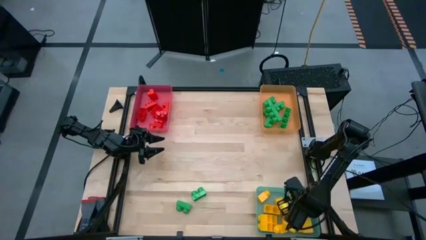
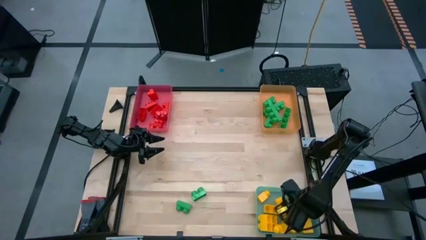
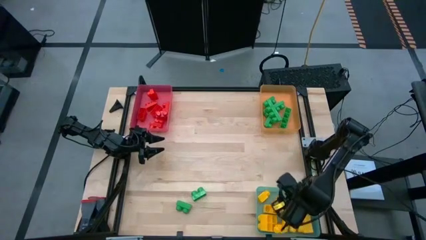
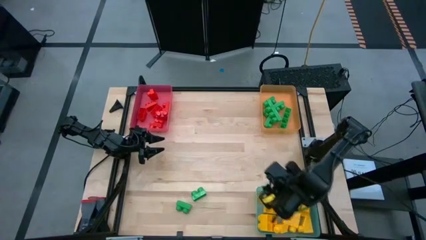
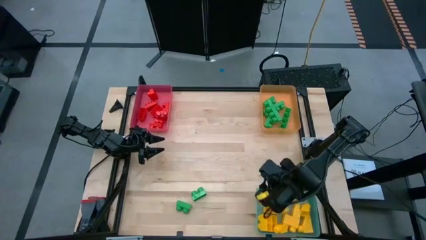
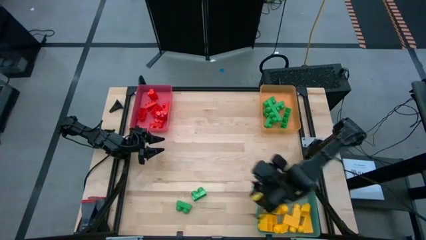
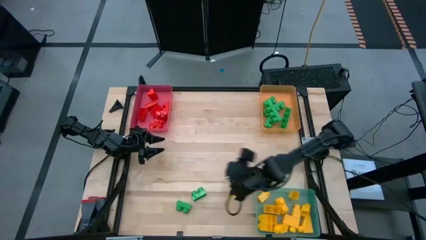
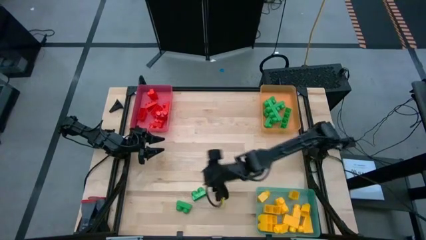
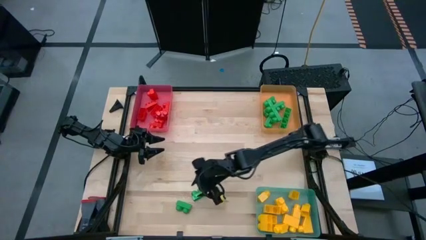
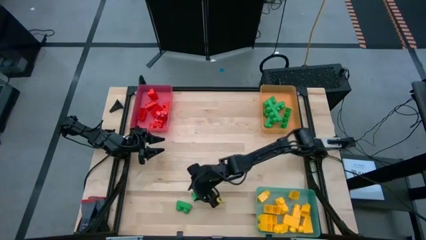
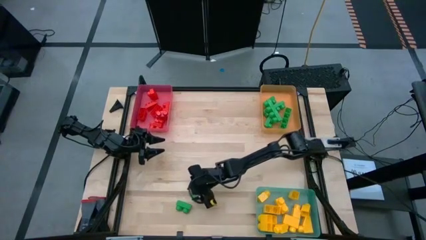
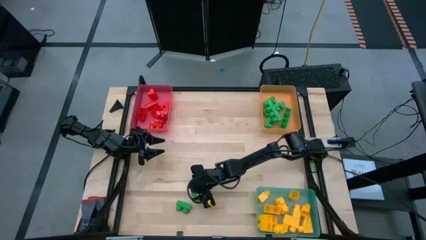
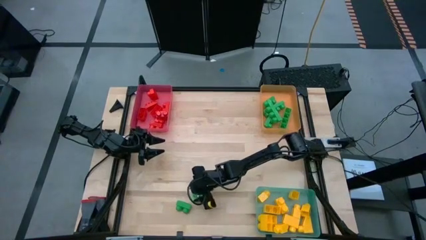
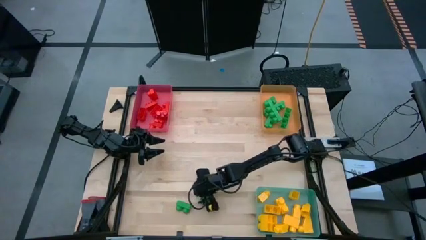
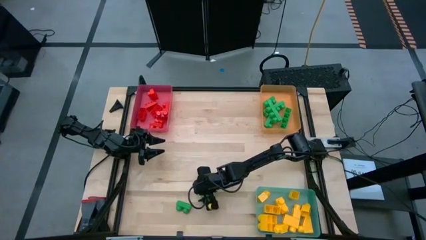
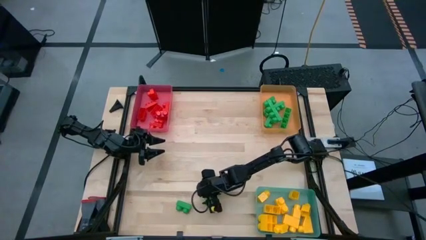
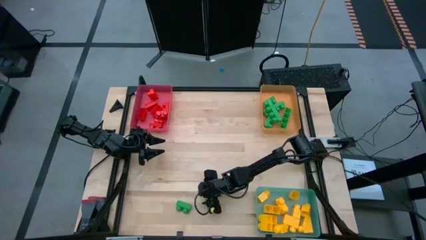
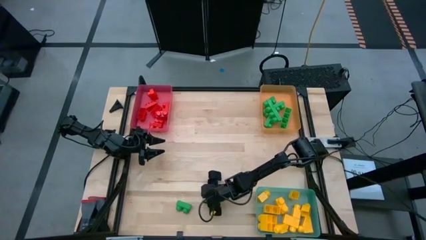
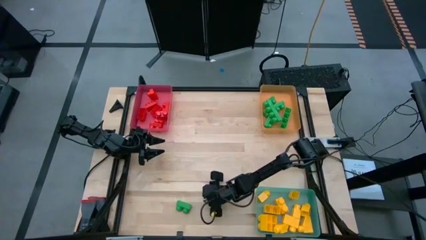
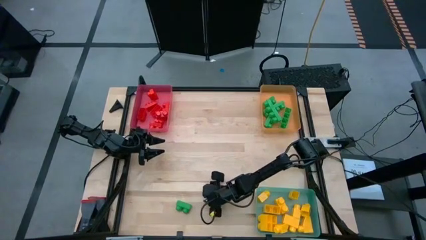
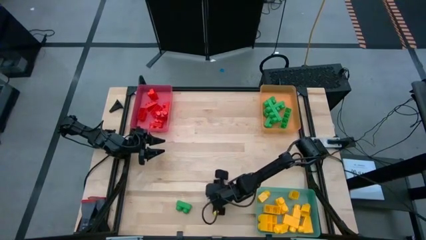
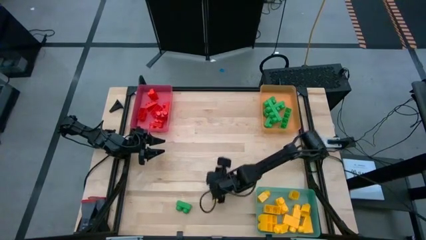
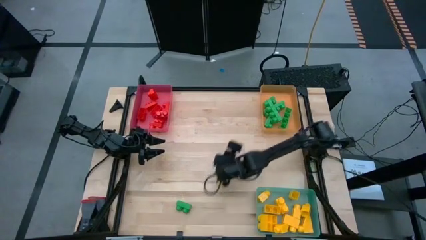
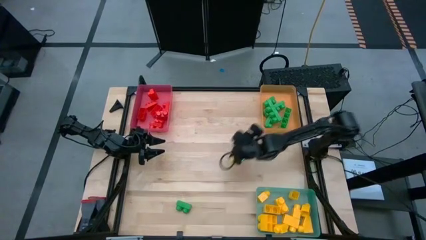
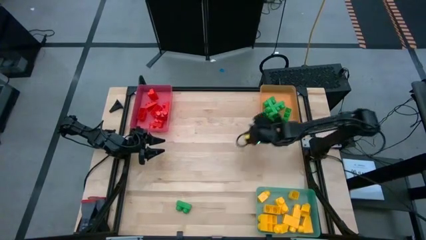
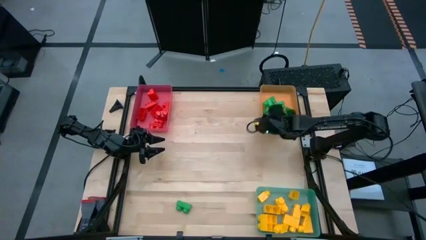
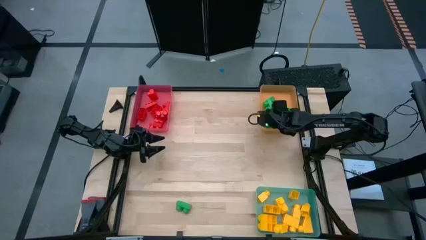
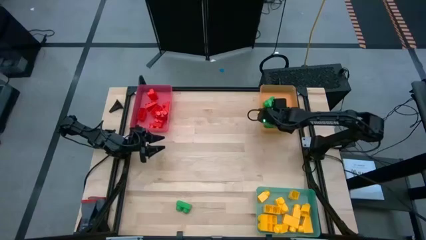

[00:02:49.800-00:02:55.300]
Task: Sort blocks
Put the green game piece into the orange bin

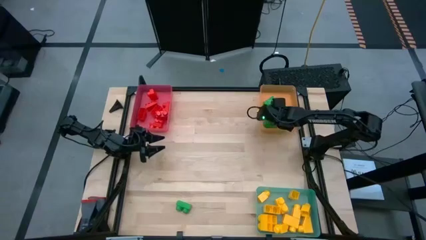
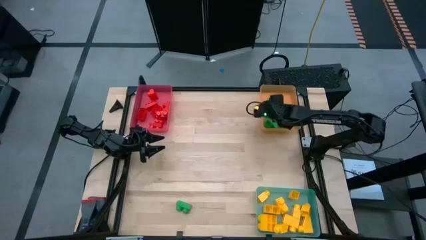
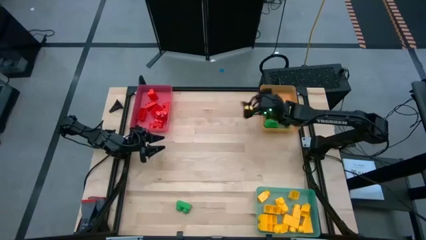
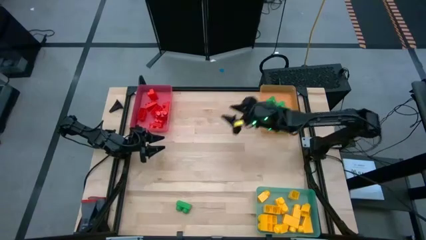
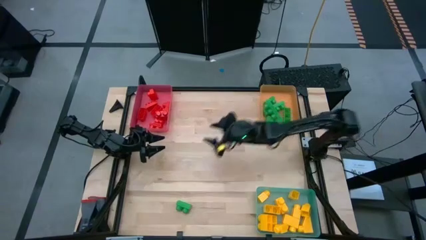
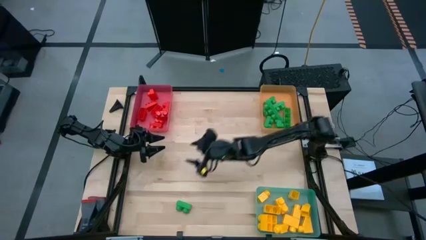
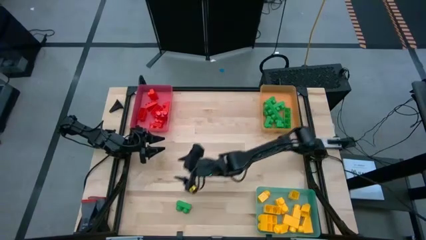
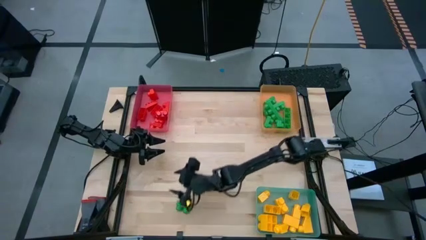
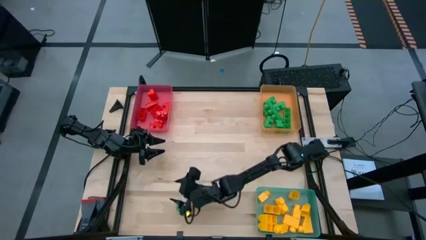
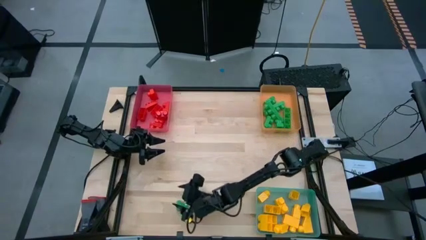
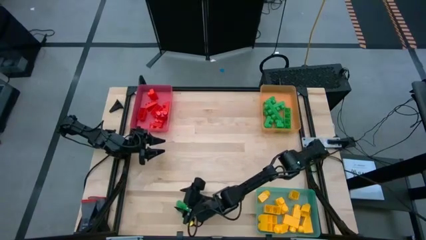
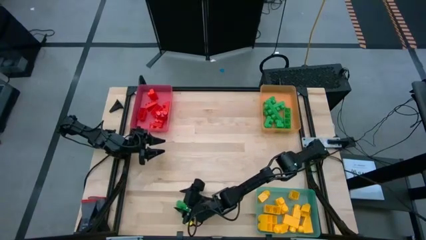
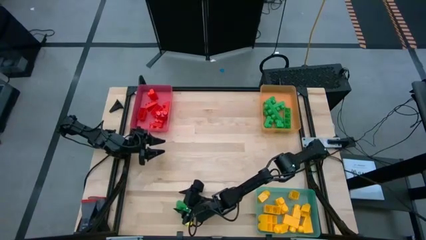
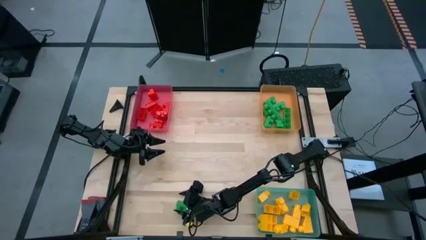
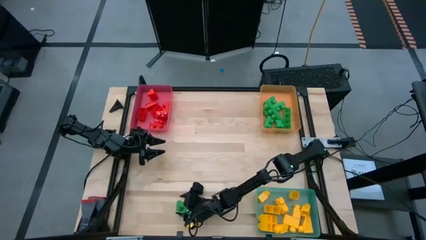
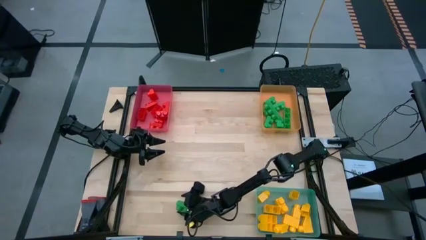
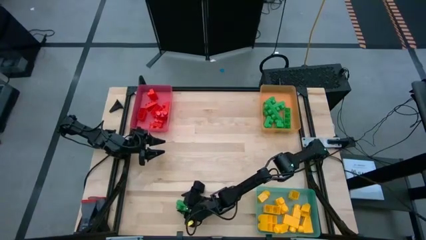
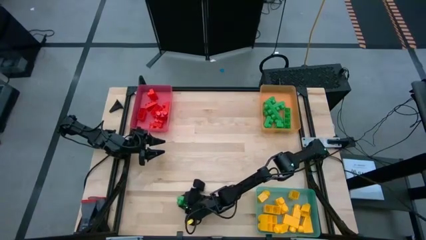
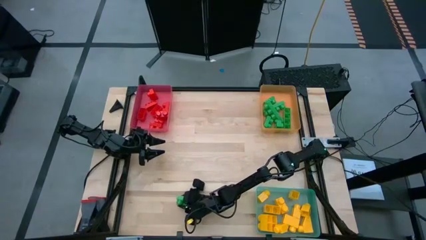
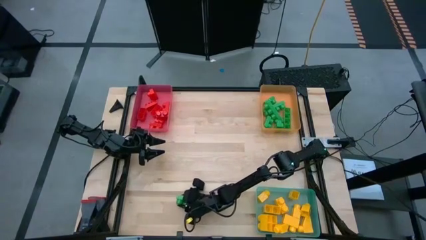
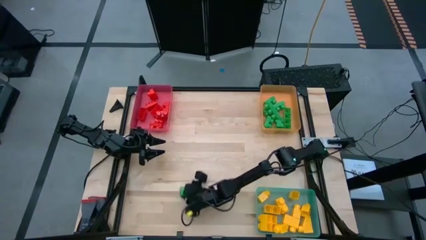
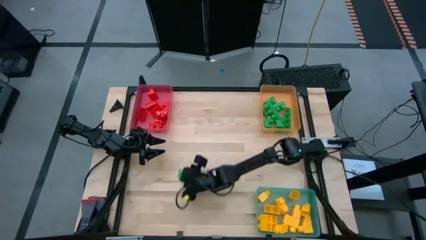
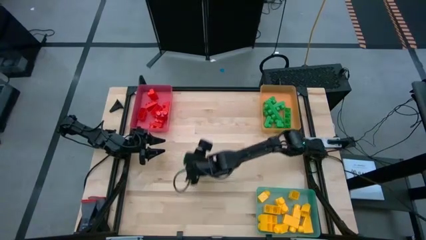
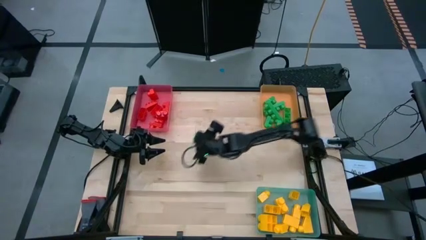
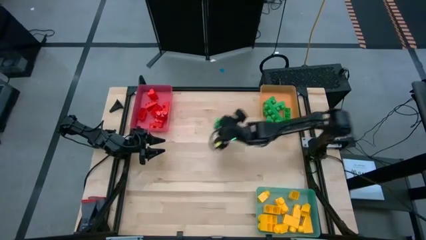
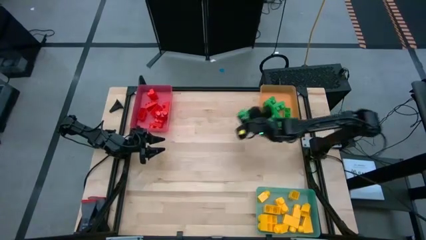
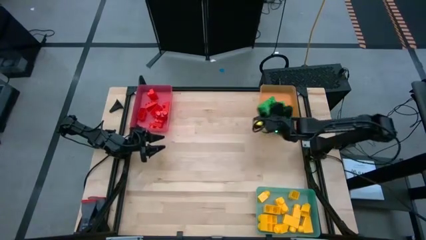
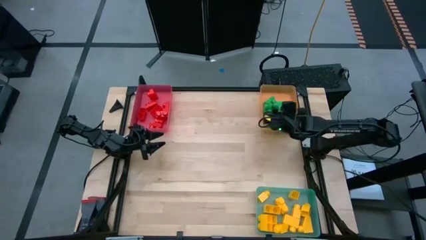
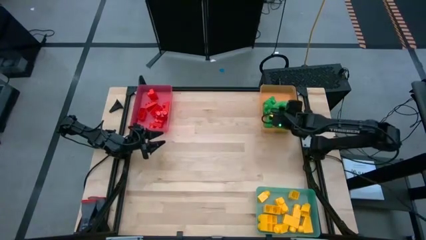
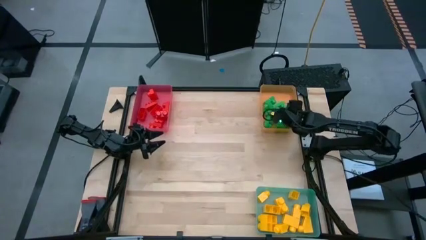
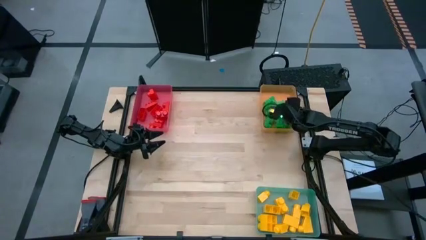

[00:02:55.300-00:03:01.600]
Put the green game piece into the orange bin

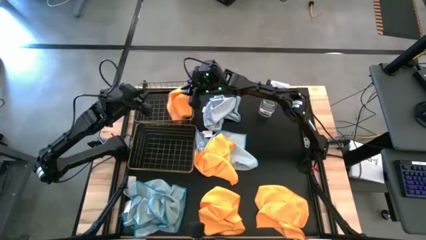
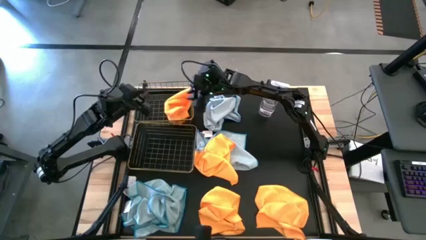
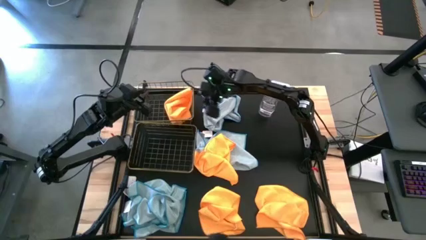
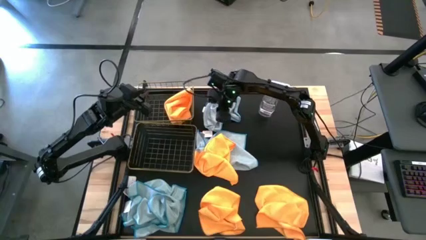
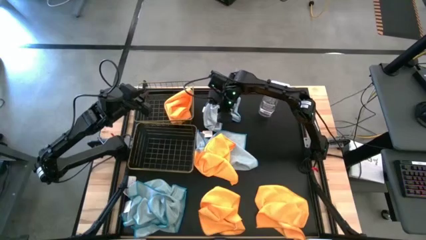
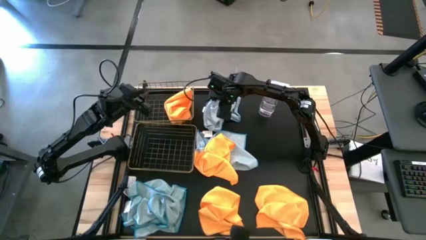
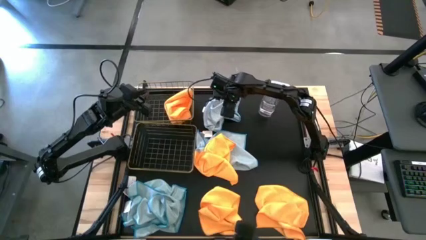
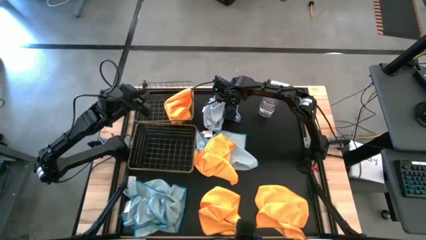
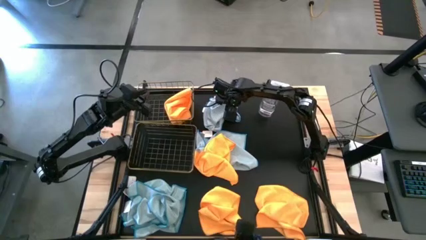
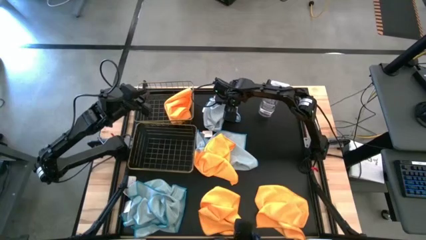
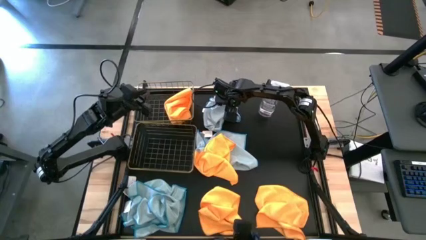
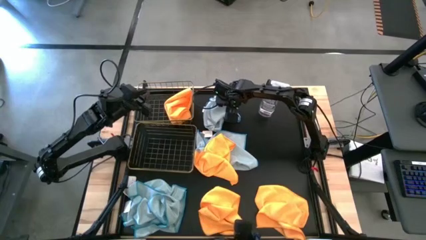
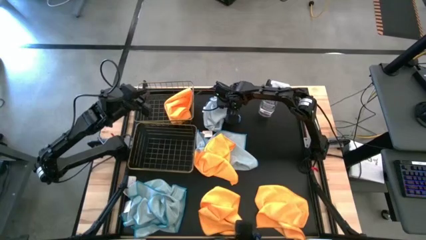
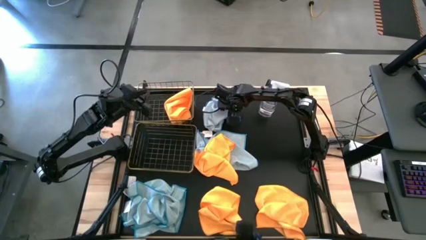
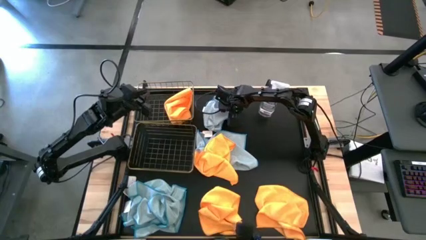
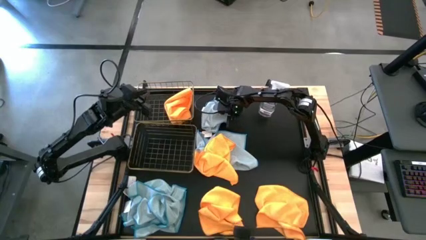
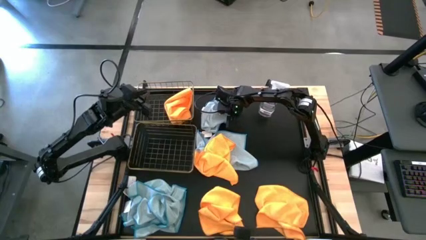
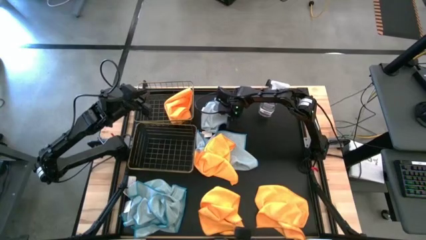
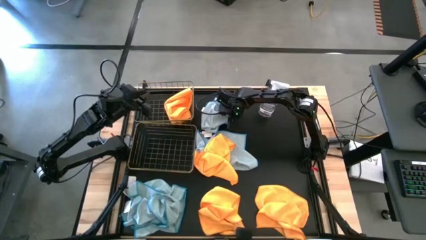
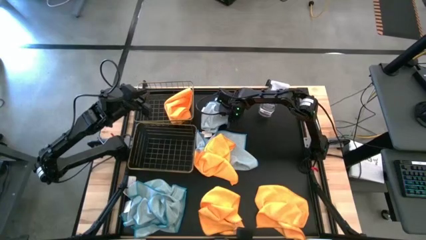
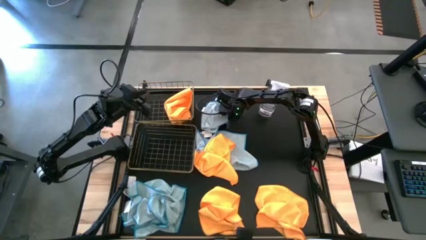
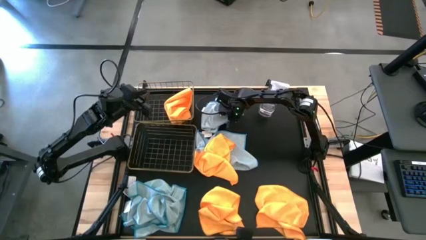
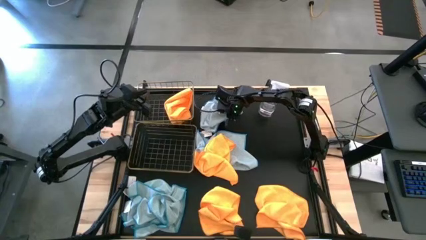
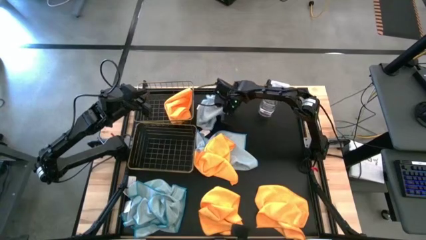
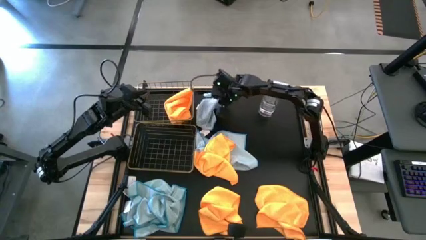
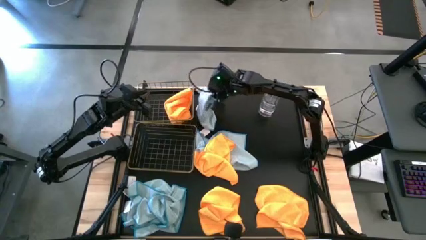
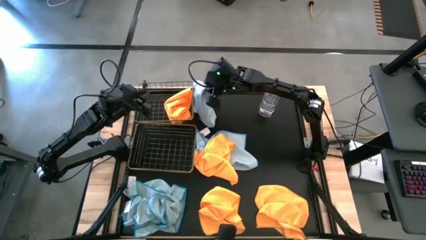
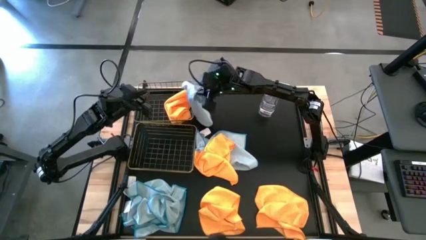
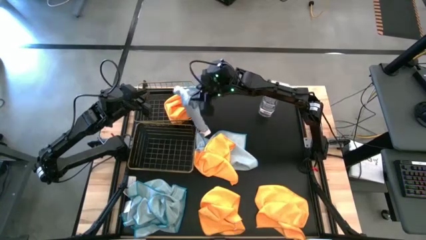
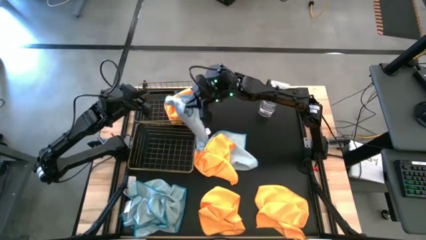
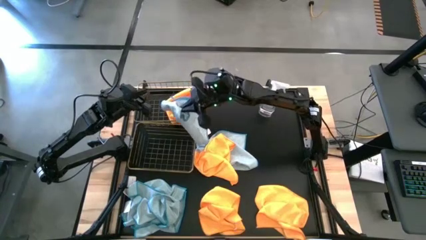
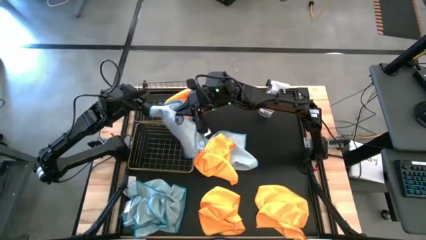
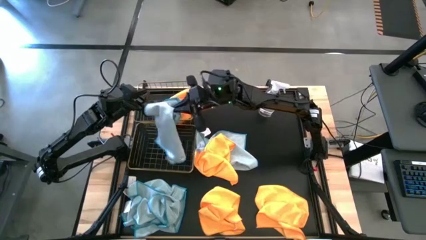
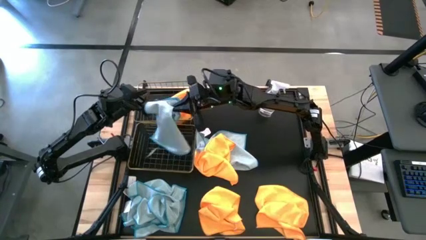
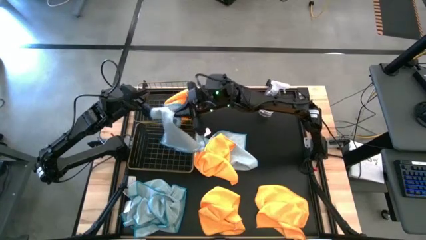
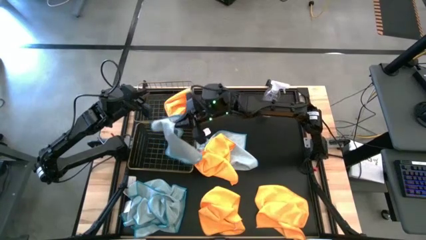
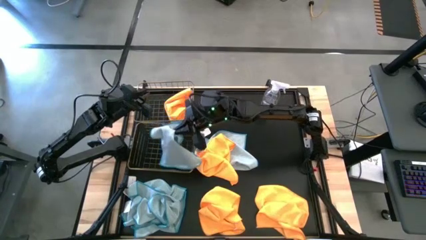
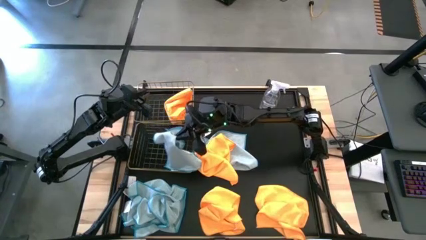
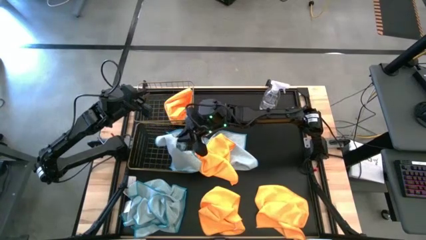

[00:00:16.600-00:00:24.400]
Task: Sort microfiber towel by color & place in baskets
Put the blue towel into the bottom wire basket
